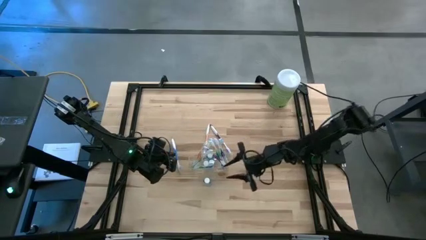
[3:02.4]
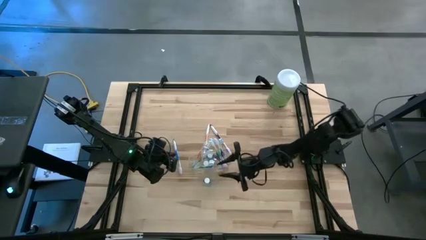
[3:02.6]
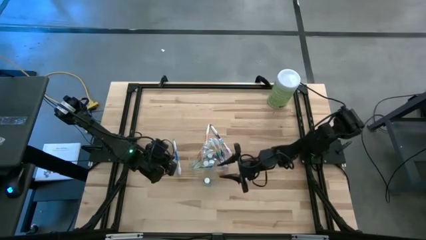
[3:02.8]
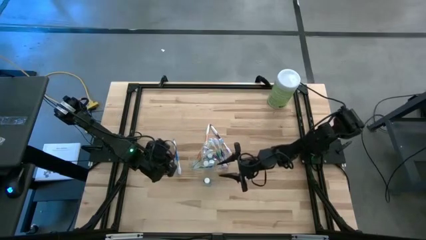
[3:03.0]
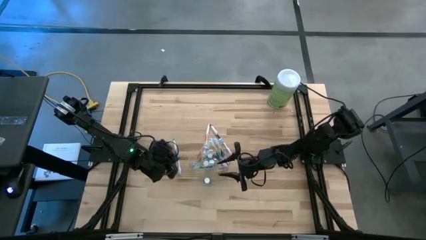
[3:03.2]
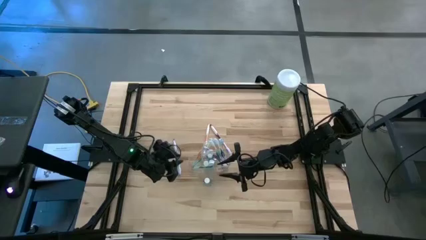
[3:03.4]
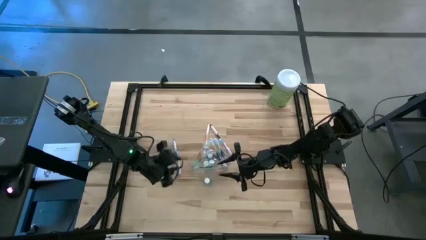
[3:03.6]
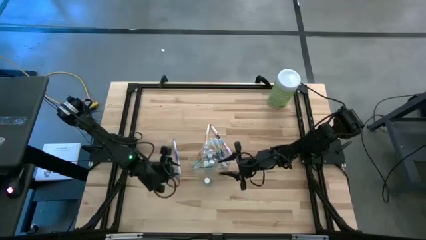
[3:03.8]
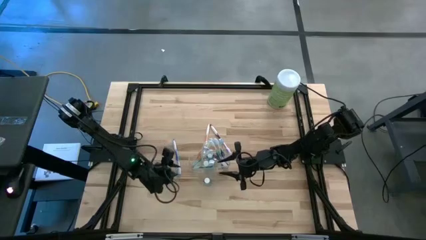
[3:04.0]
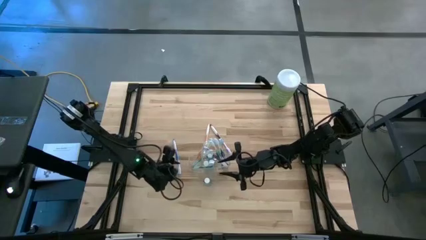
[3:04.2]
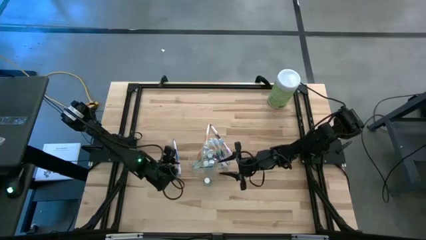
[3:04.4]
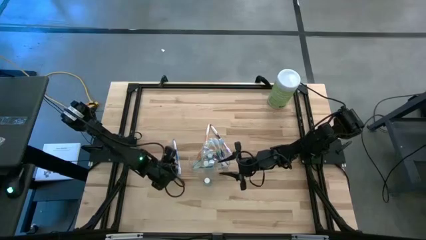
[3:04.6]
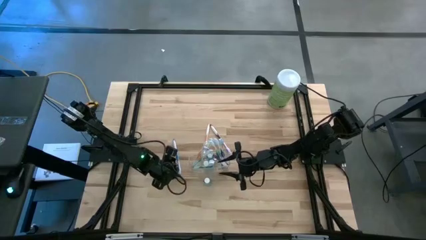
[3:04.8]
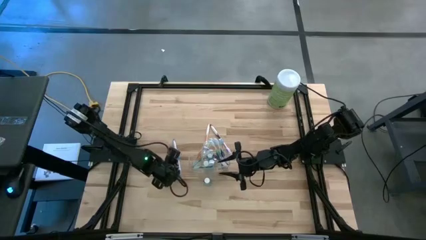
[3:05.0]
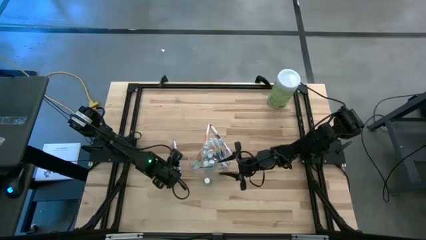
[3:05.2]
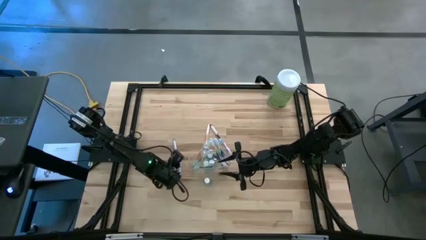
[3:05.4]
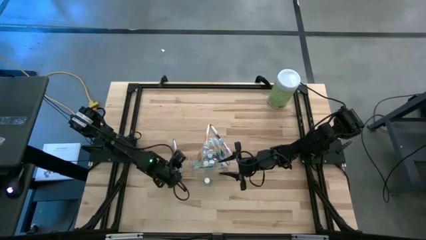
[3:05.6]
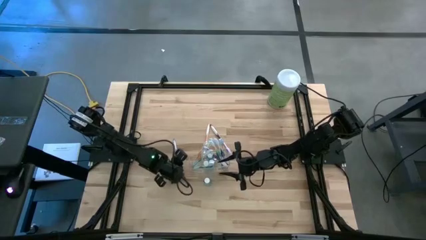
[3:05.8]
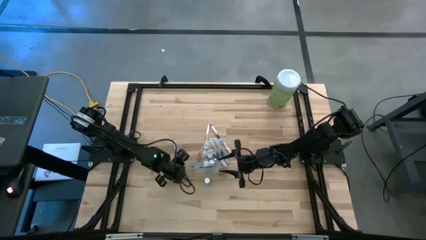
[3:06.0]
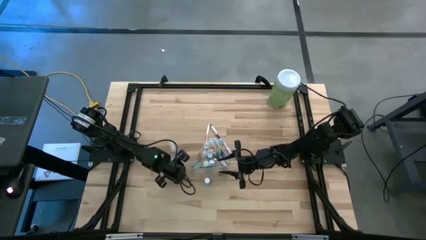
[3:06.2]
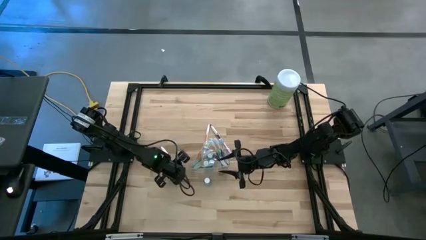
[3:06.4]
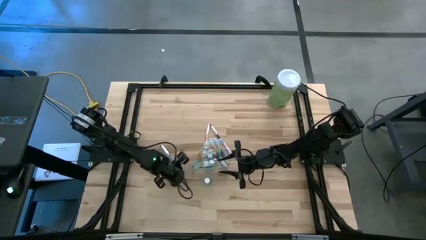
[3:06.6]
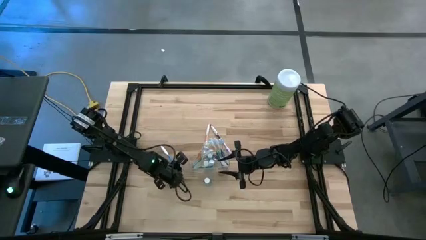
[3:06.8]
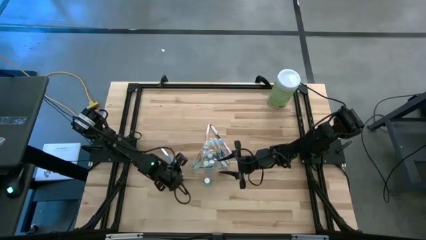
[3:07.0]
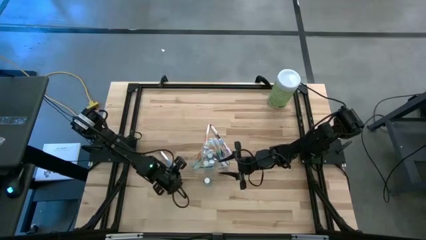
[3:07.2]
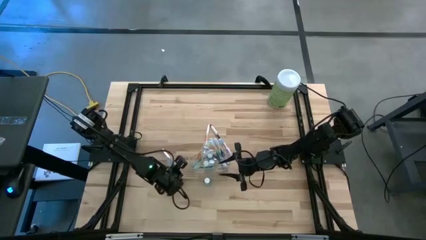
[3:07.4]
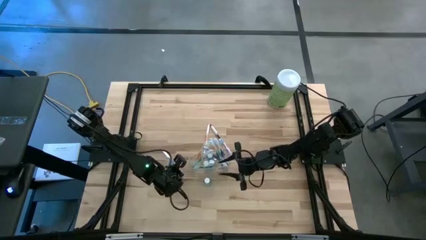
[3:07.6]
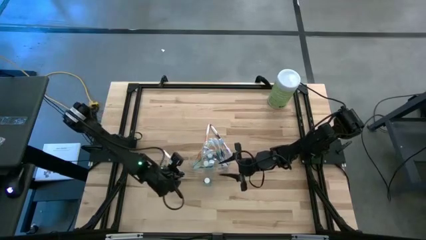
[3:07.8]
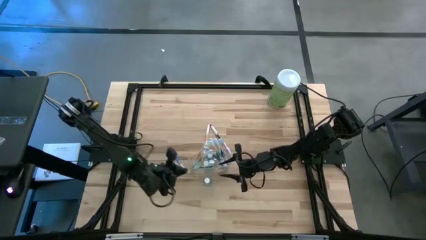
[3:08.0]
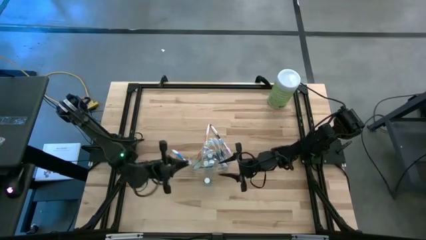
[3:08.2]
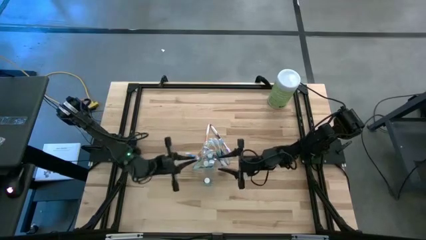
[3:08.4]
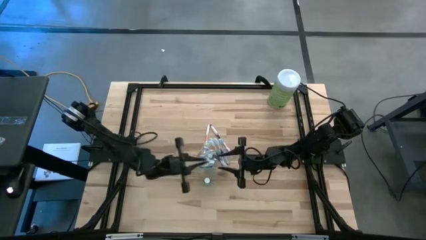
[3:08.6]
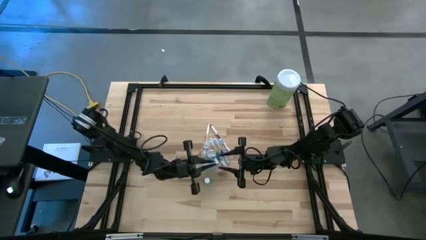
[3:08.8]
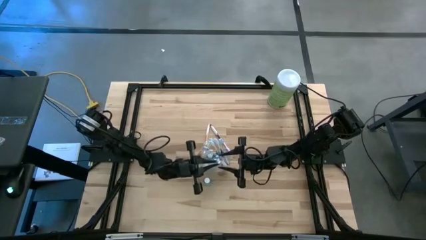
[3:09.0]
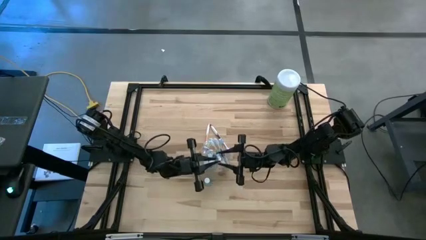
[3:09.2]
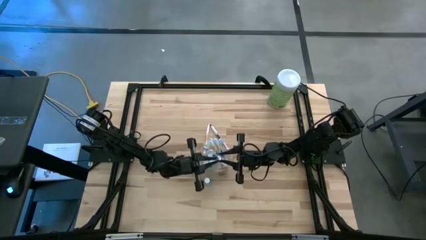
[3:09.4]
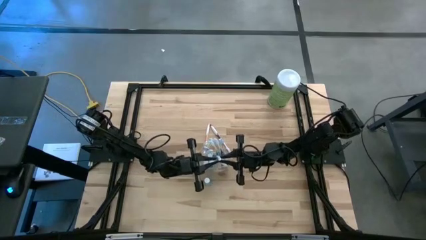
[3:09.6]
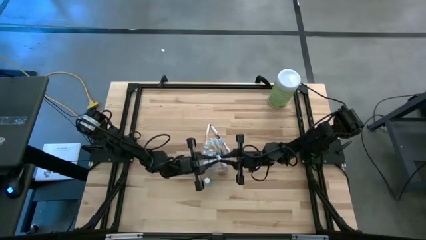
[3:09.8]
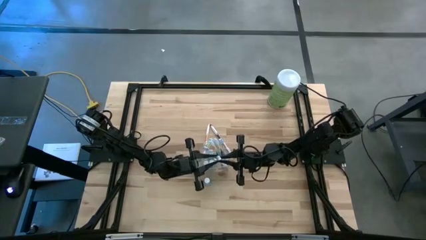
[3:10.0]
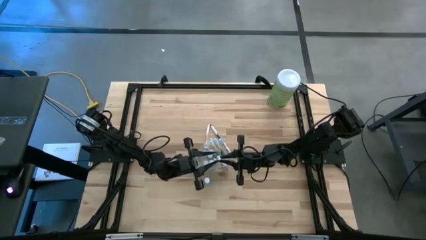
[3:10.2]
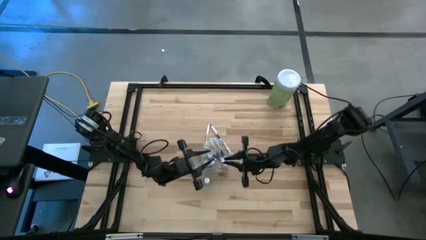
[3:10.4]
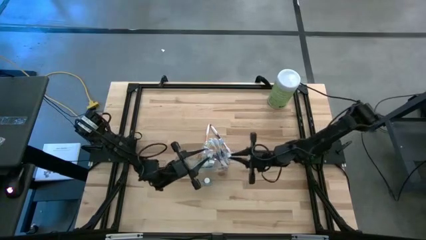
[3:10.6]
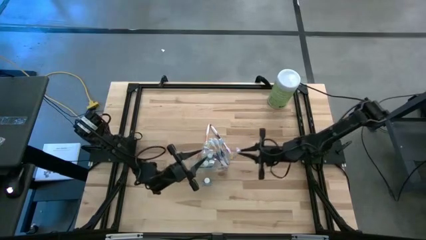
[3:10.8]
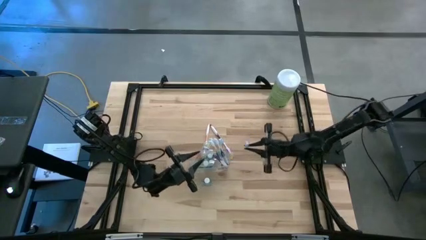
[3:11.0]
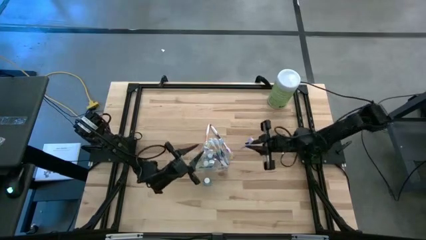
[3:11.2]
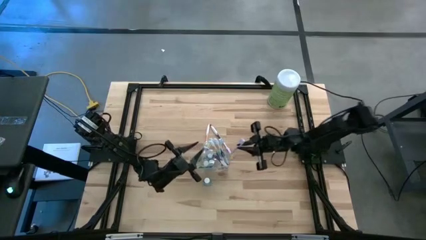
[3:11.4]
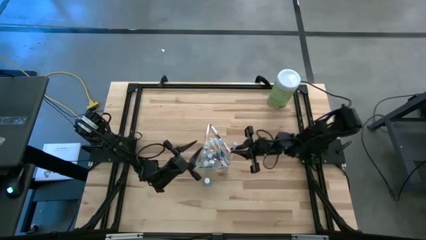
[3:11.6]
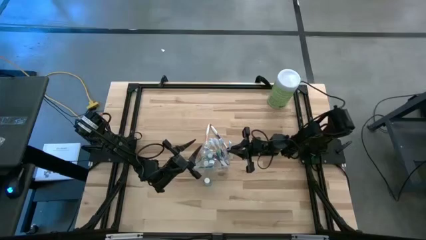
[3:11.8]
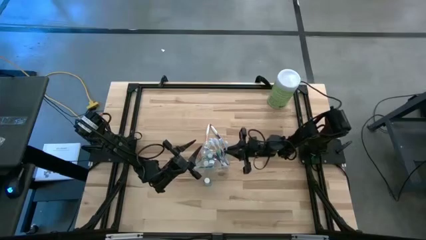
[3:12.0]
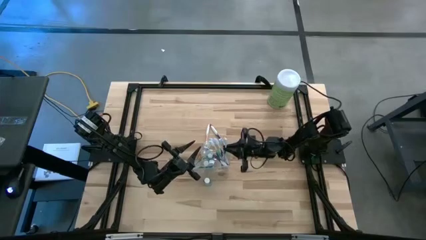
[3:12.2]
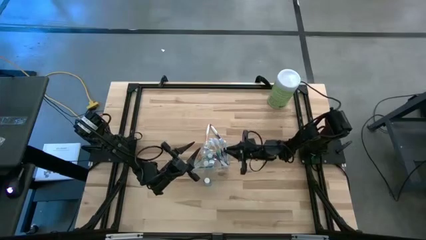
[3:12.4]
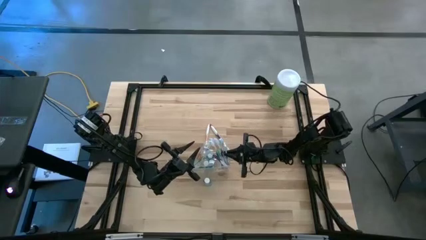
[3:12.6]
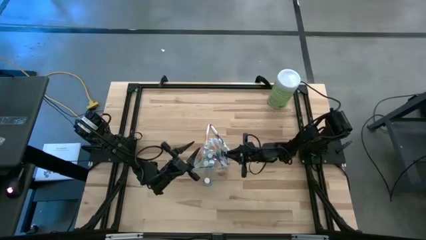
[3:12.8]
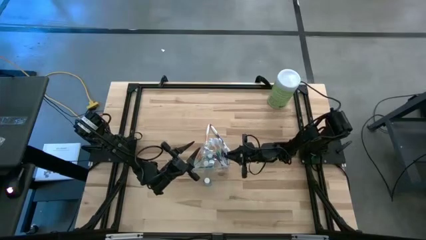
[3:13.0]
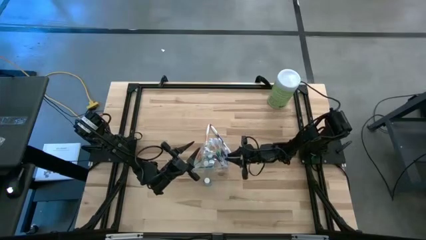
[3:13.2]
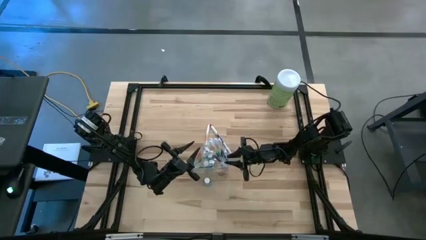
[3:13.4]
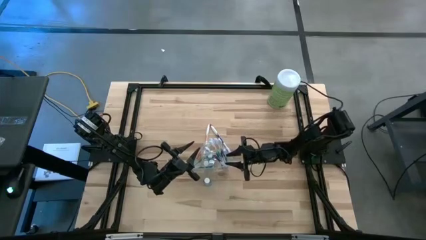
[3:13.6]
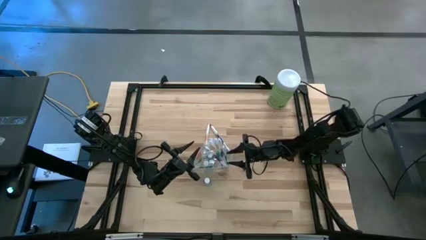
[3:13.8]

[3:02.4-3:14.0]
Task: Pick & Place toothbrushing station
Put the blue toothbrush into the transparent organizer

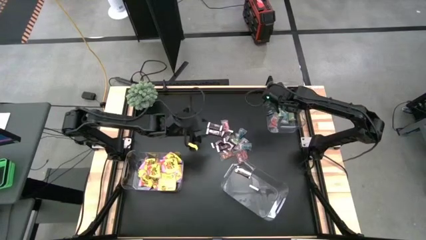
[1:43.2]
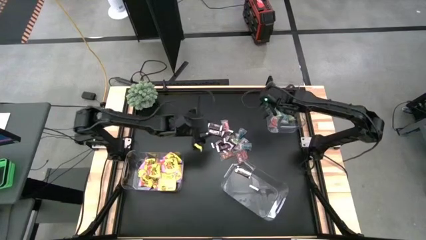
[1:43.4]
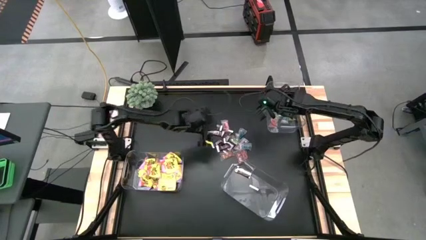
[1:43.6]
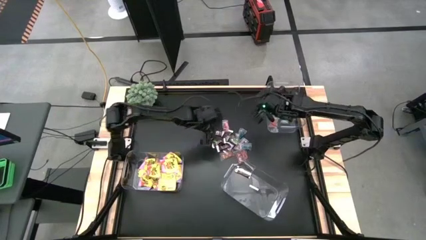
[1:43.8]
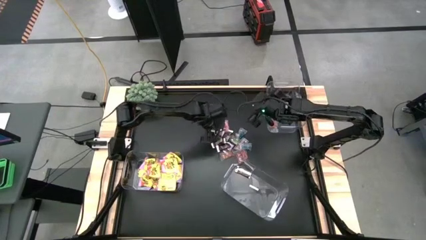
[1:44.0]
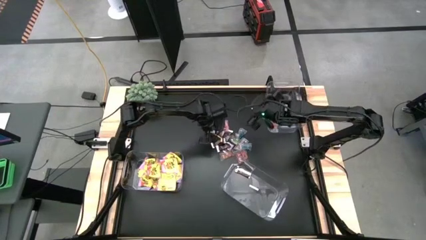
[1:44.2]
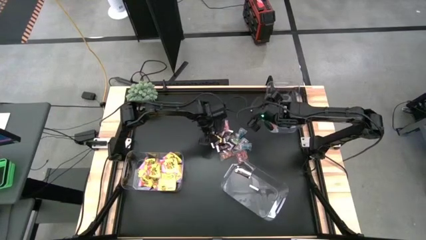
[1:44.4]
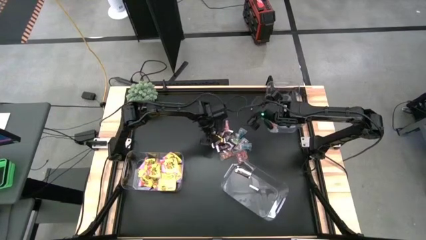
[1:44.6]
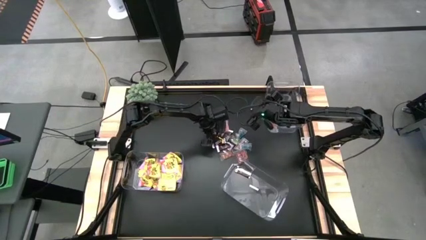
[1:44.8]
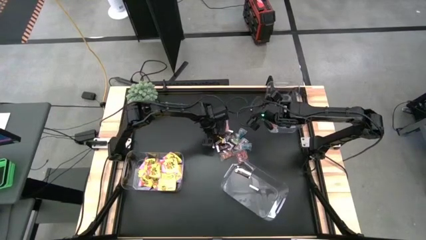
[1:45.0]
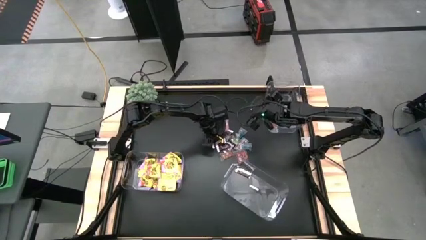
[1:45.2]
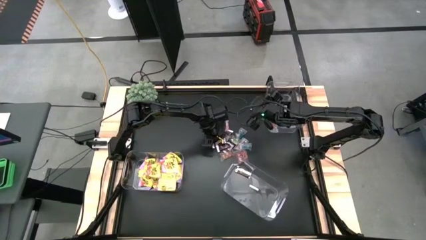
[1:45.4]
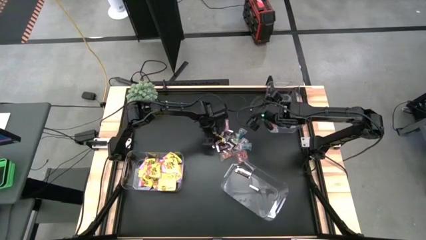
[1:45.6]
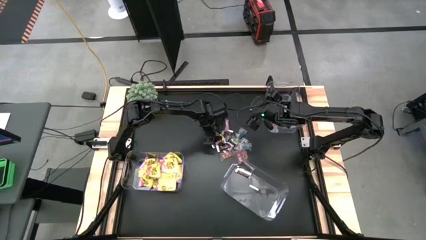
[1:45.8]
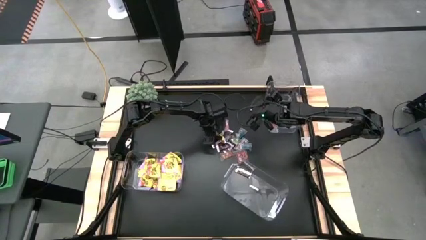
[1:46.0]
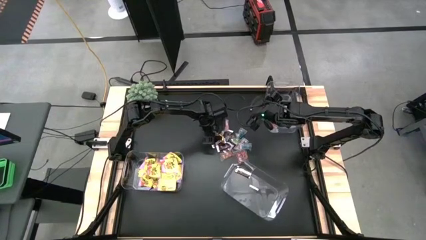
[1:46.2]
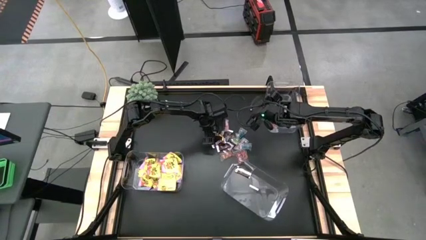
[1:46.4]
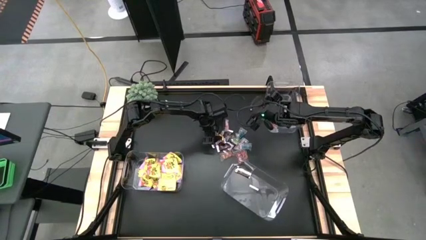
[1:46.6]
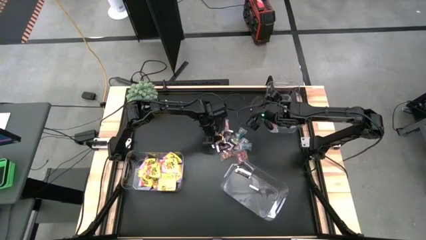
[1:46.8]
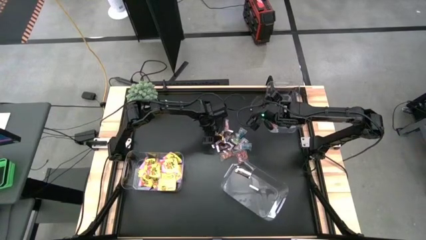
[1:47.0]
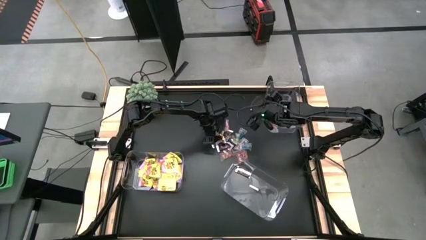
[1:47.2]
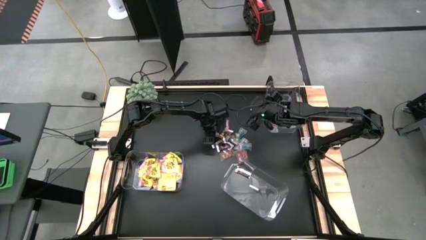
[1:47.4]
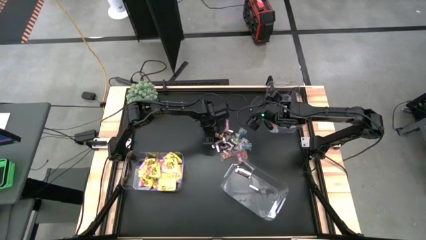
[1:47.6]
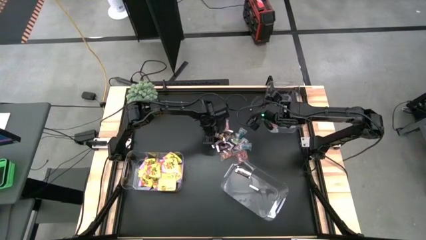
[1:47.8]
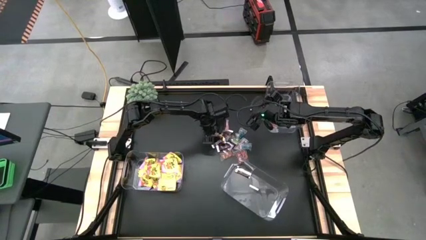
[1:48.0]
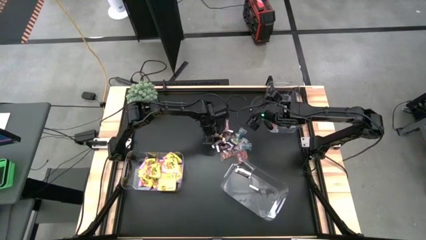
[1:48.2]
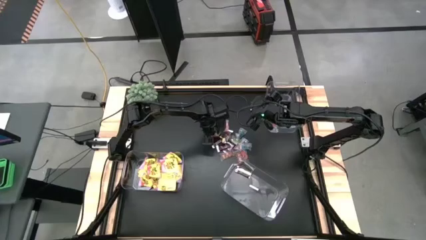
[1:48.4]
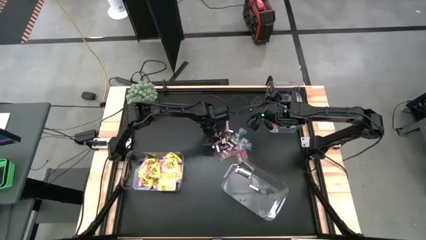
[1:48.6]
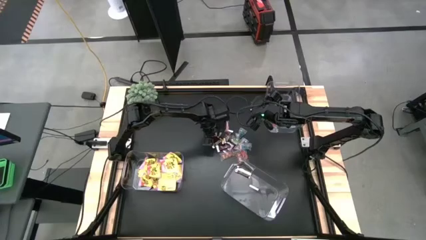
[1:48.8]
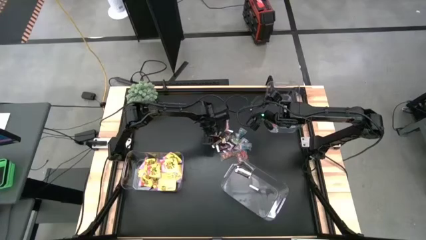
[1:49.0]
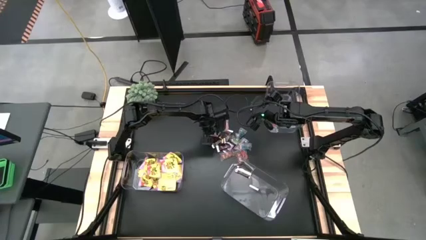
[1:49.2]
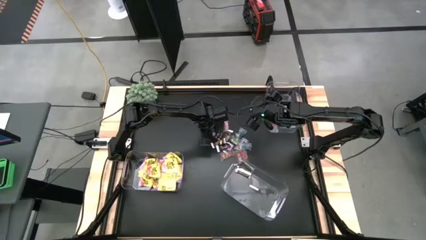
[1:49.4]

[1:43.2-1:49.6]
Task: Sort candy
Put the brown candy in the bottom right transparent container
